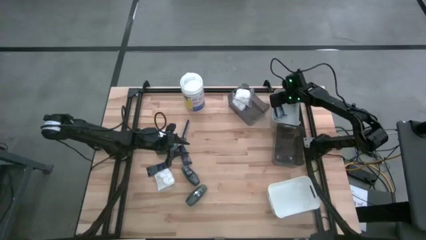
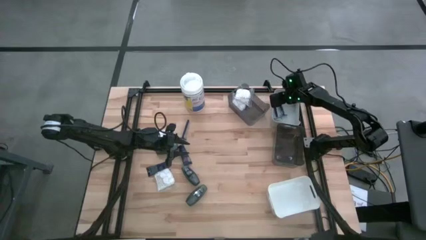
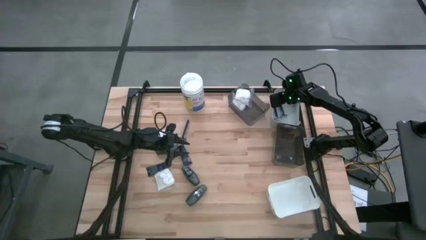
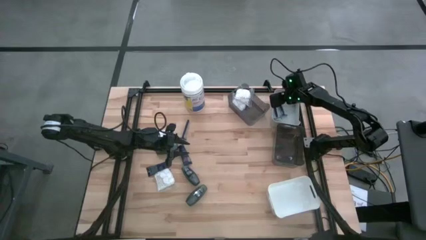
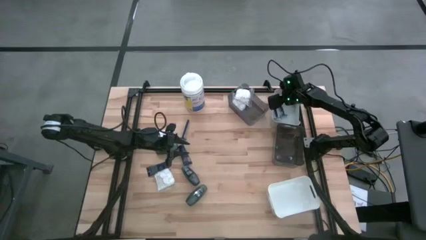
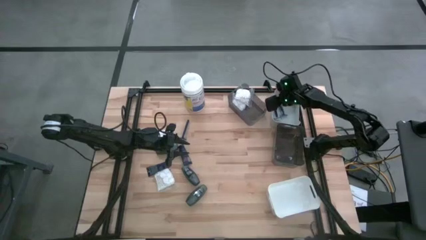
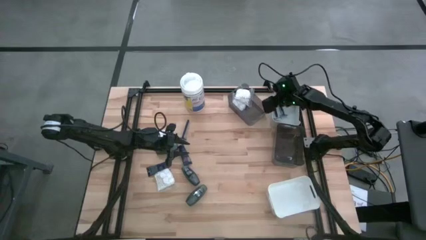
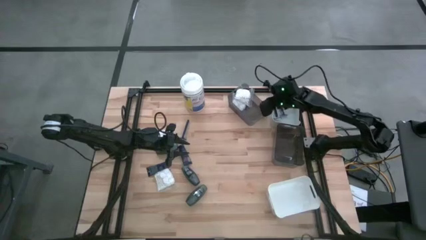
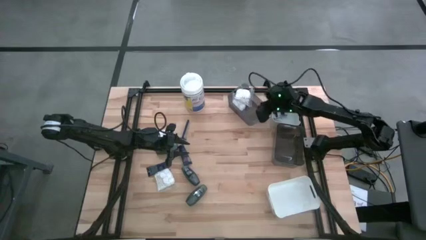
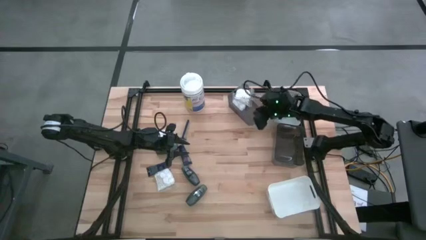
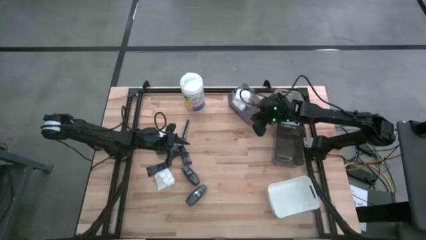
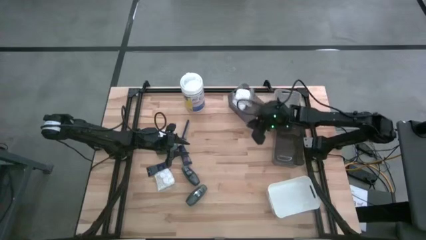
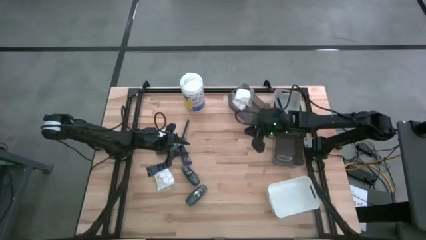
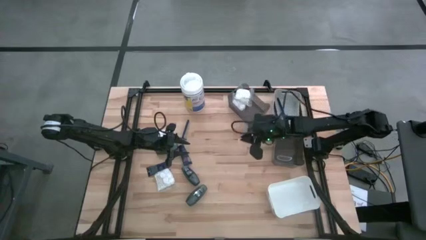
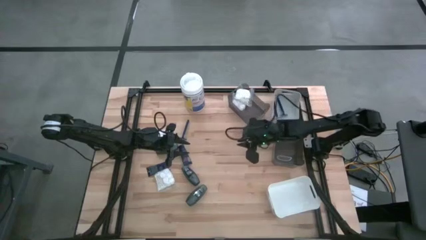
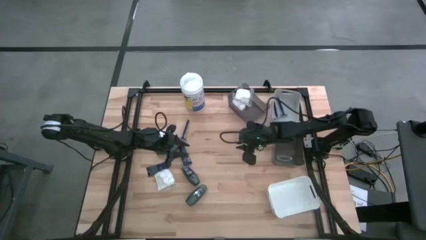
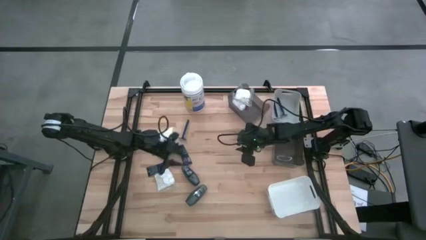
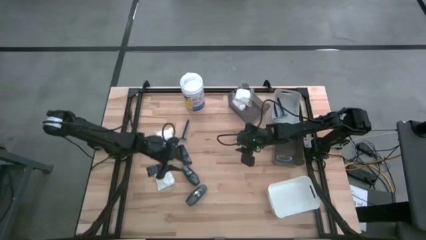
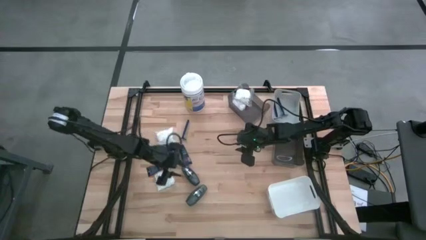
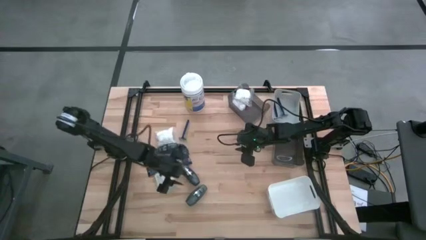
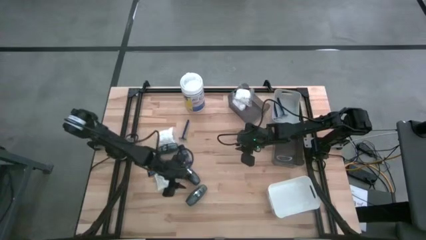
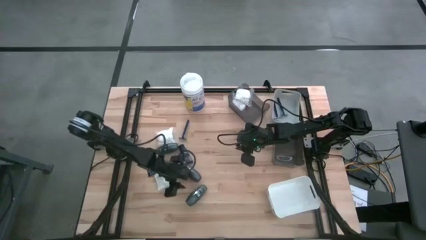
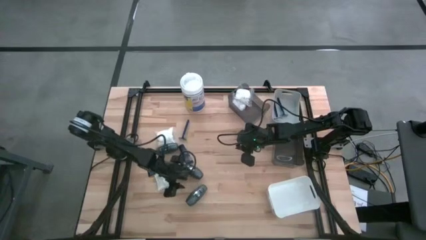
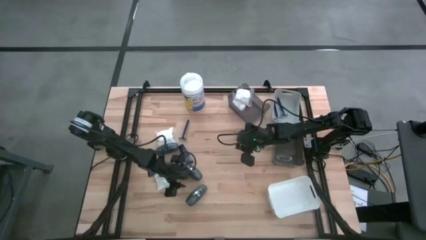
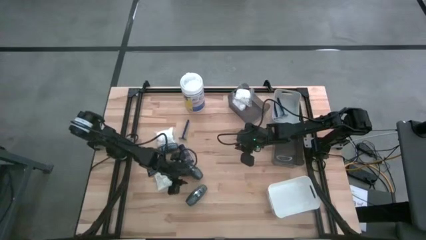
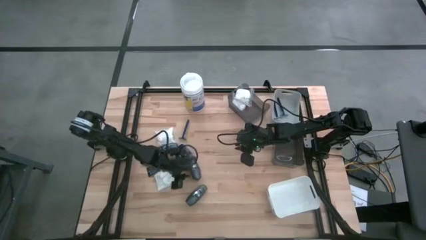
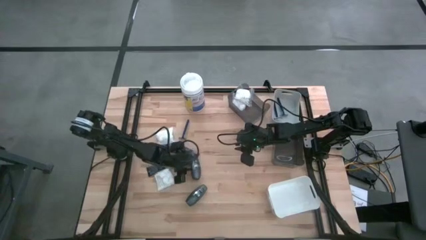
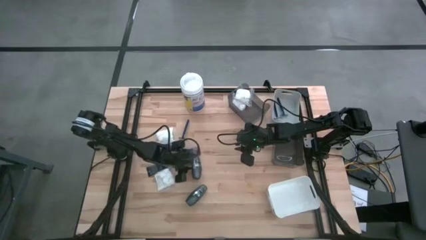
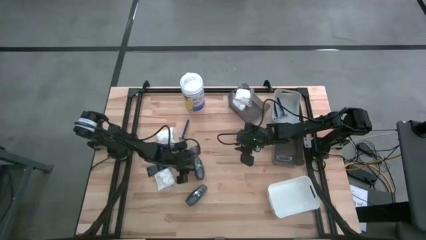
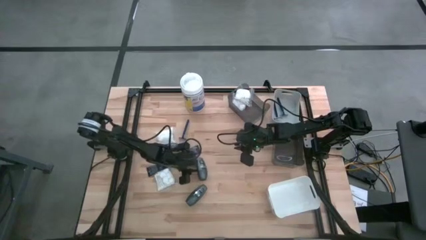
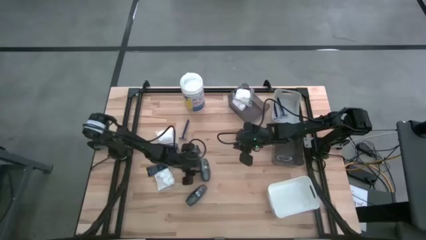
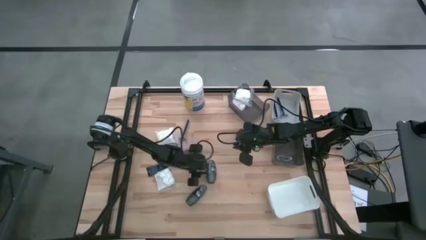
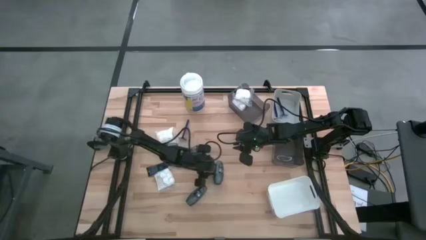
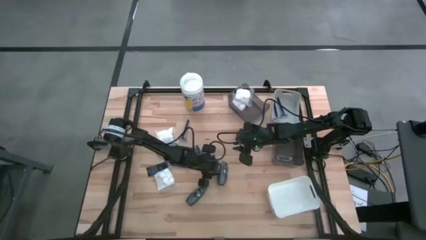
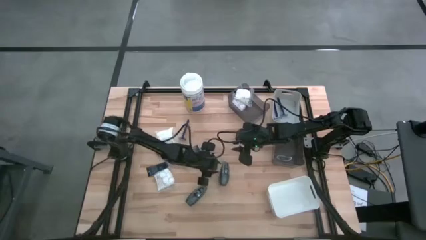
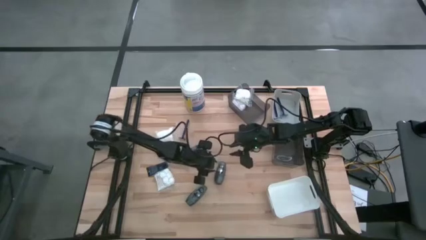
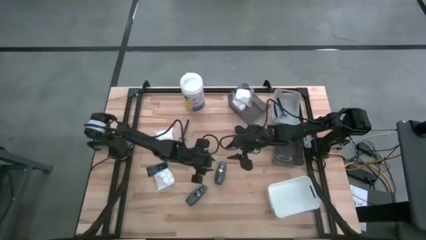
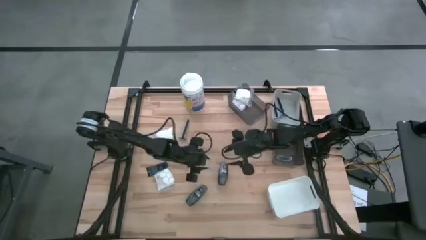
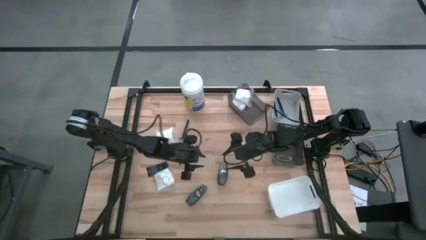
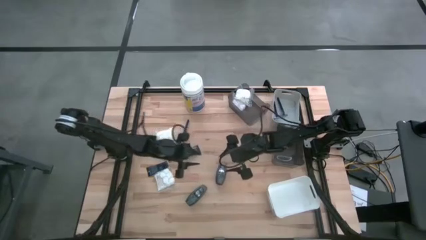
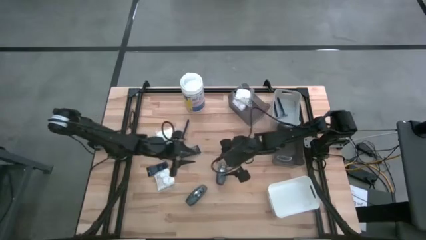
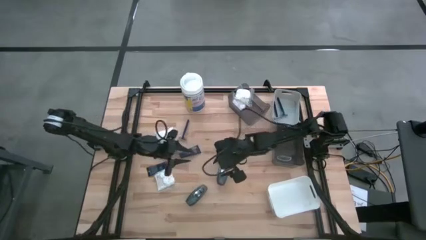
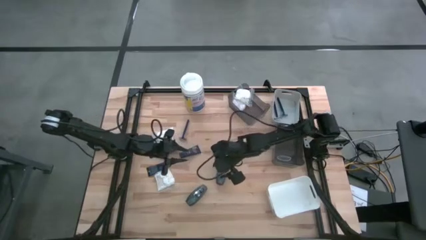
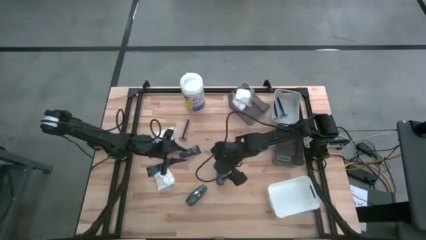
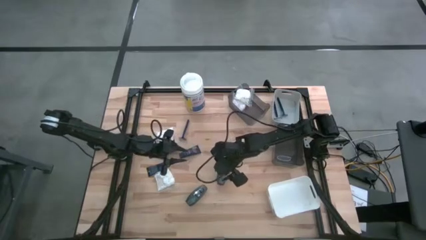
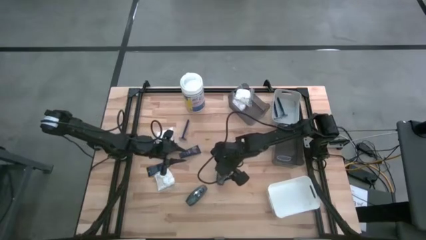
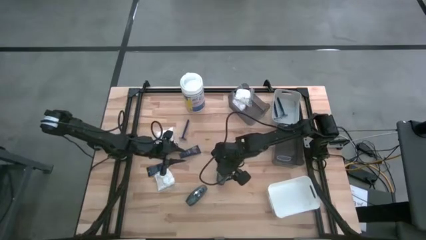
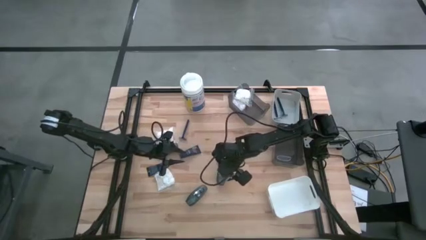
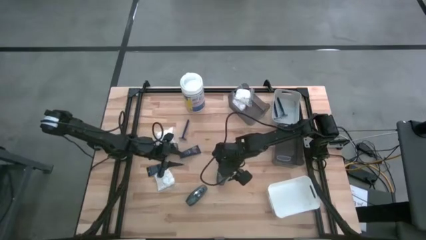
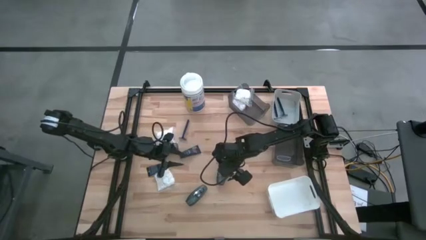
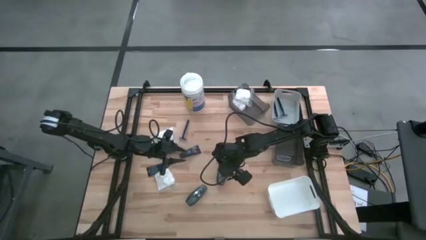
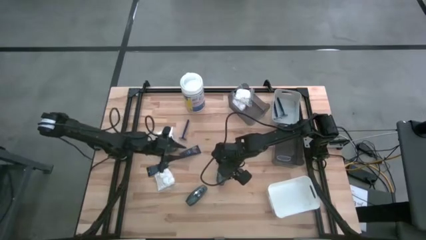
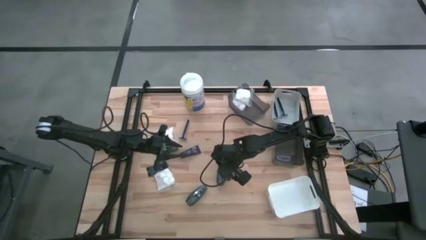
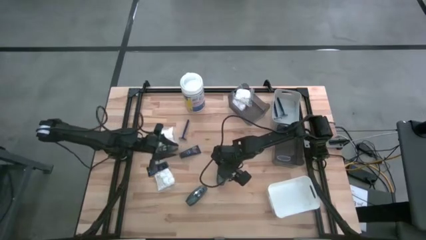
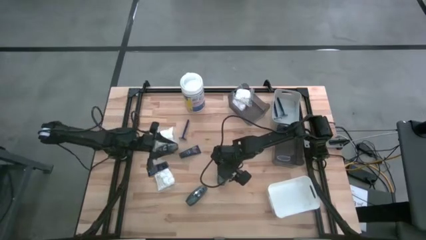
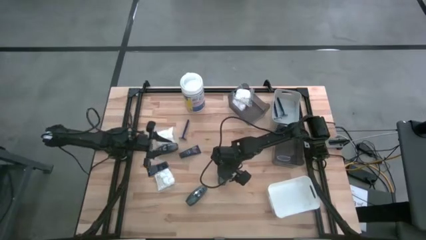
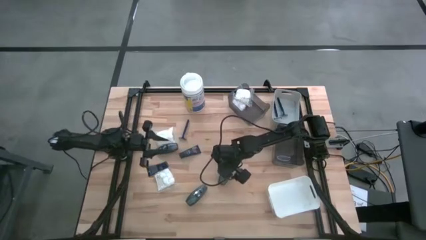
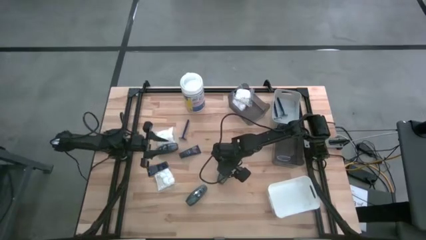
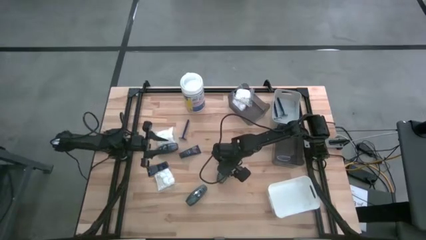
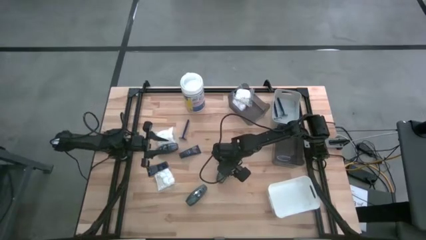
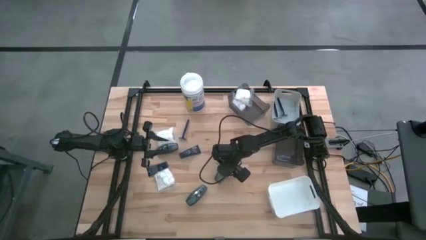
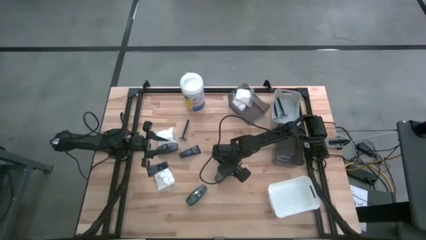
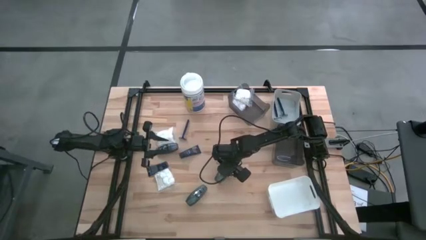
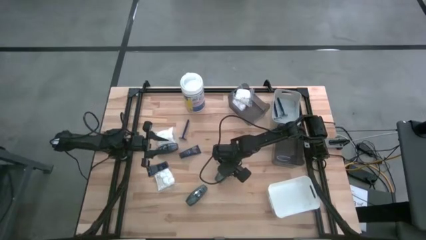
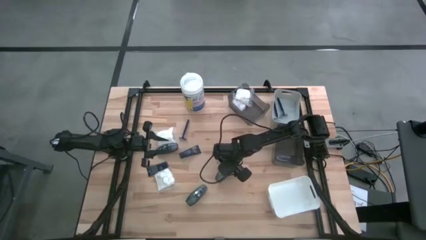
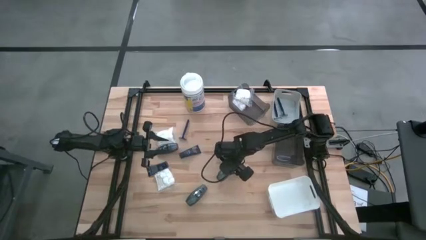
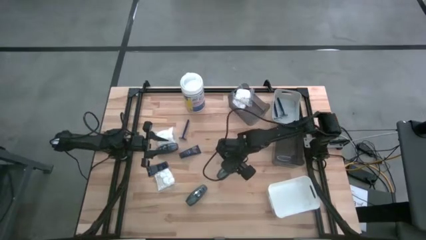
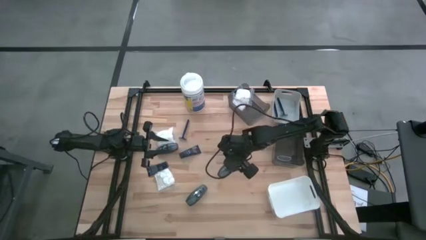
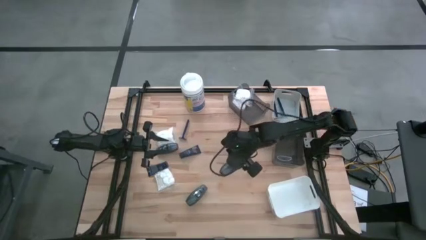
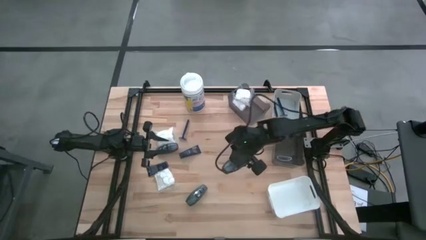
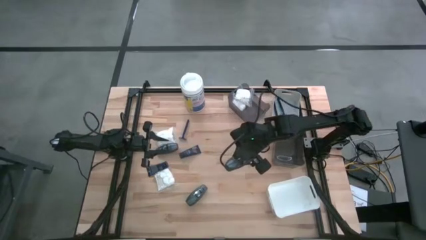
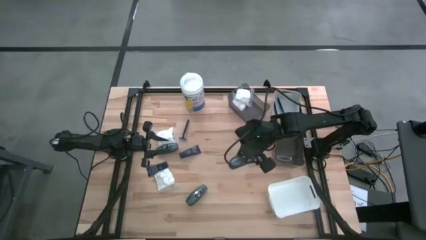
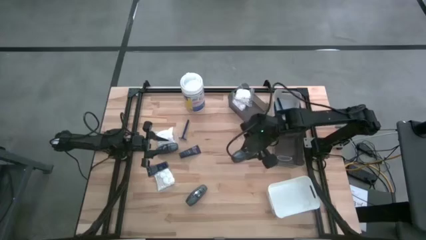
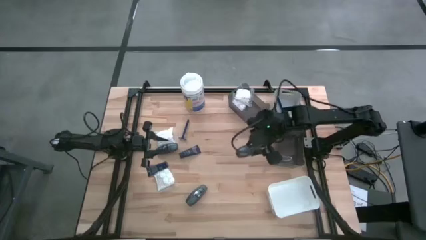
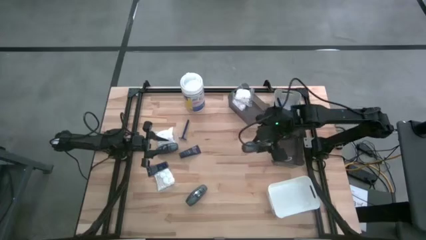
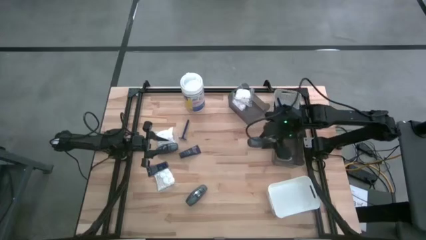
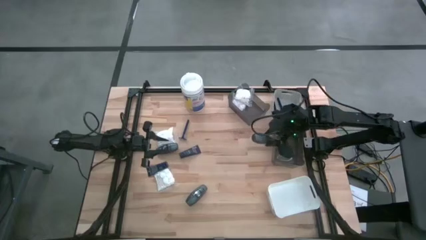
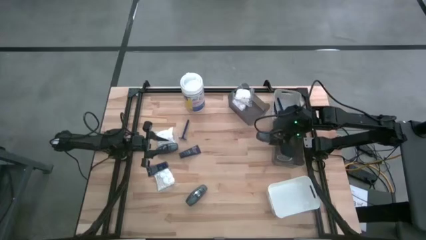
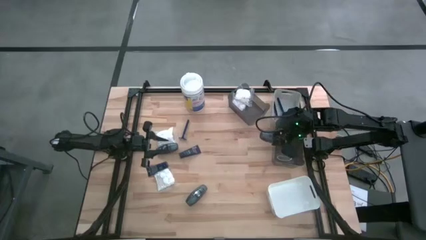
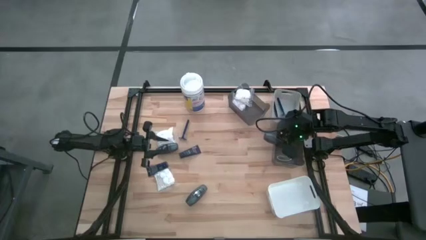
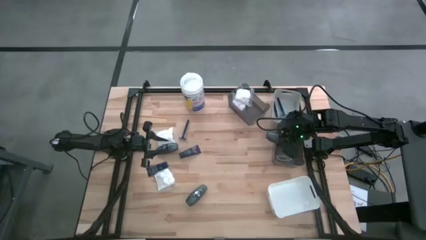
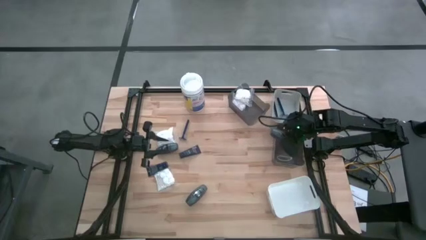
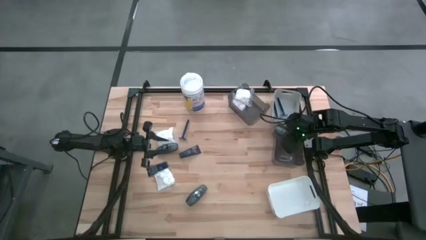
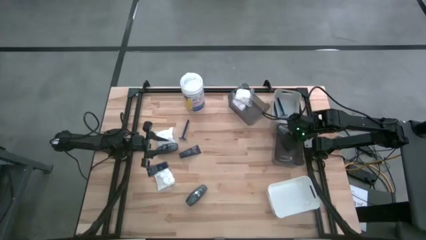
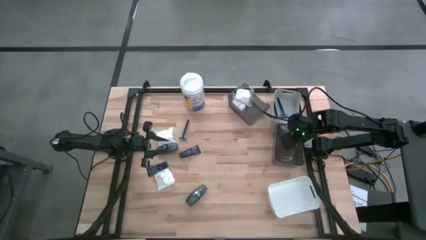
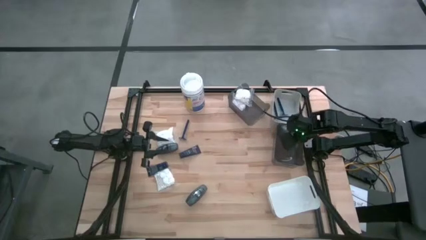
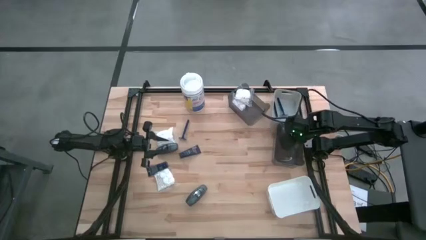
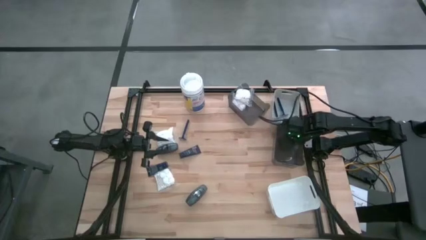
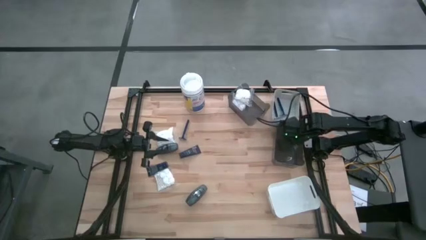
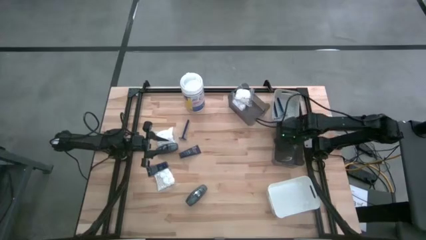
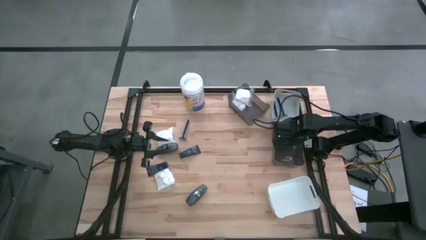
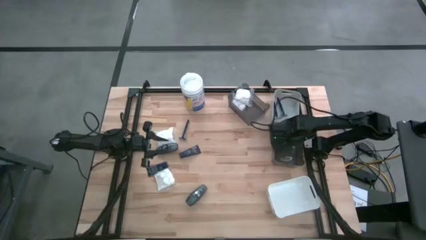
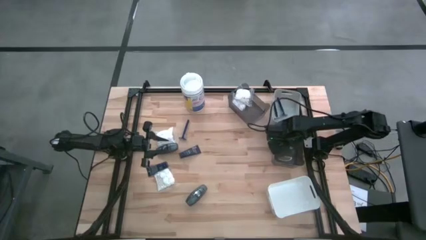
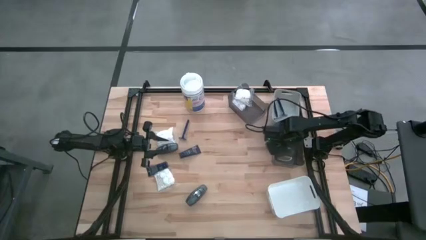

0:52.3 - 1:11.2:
Task: Pick & Place Travel size toiletries
Put the middle gray deodorant into the bottom black bin
